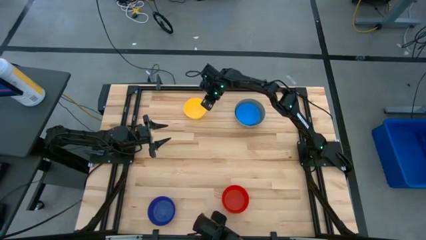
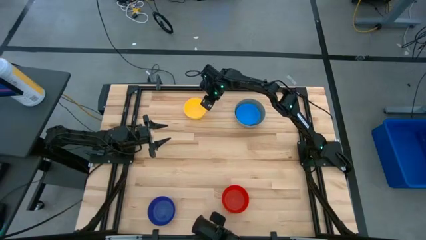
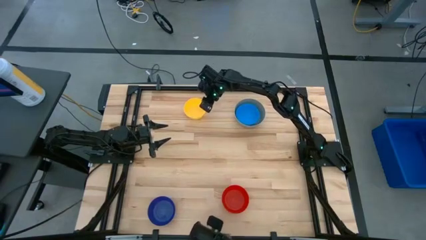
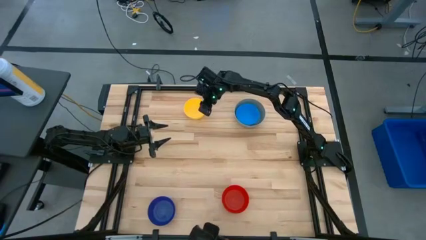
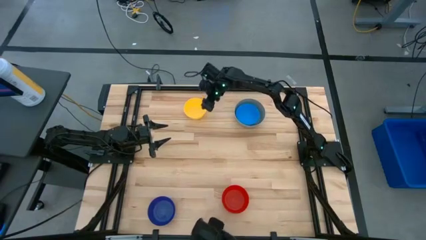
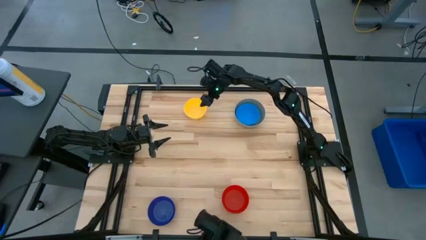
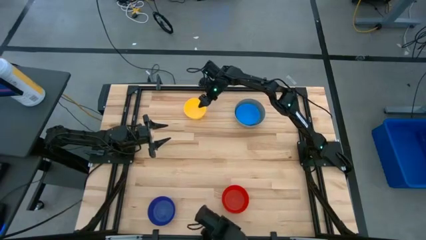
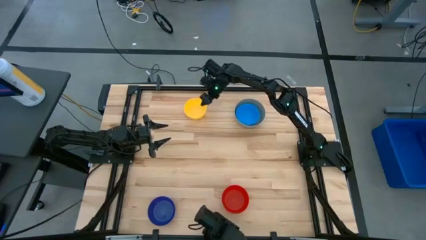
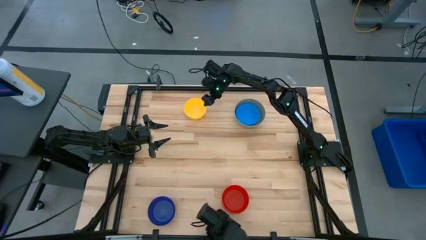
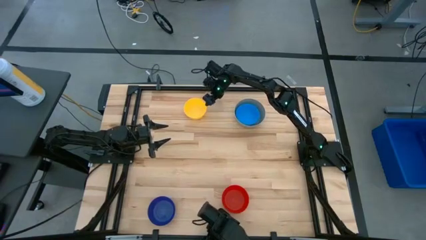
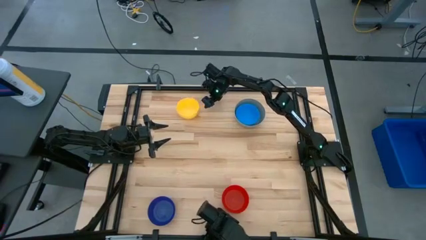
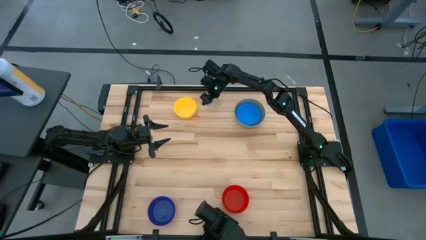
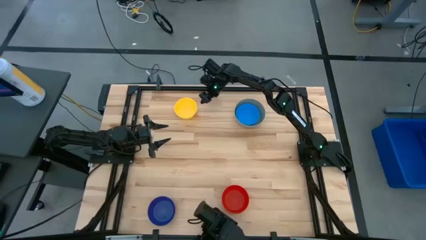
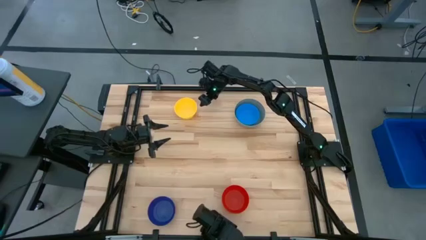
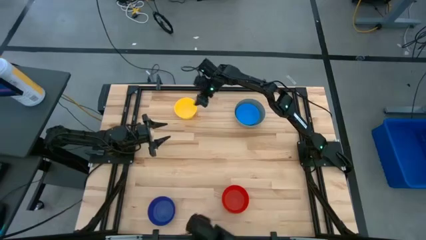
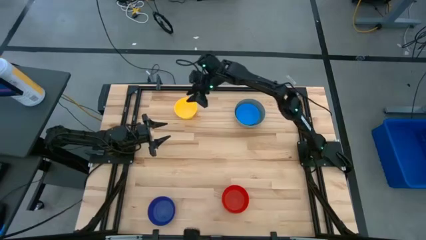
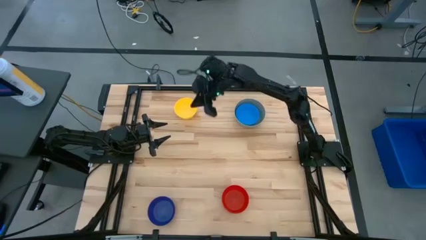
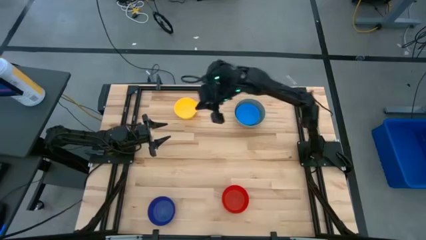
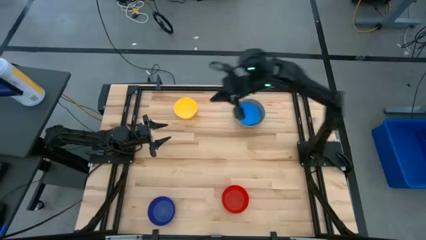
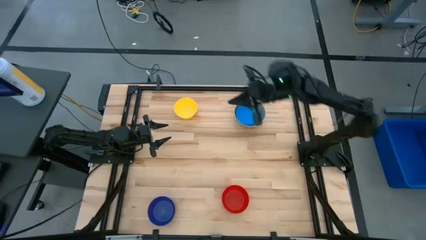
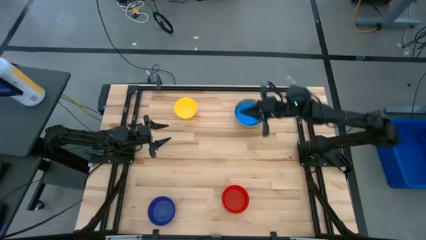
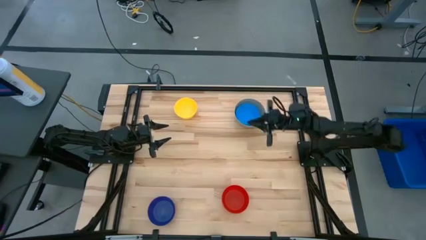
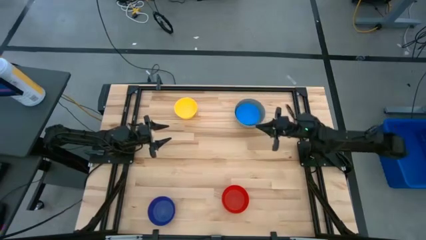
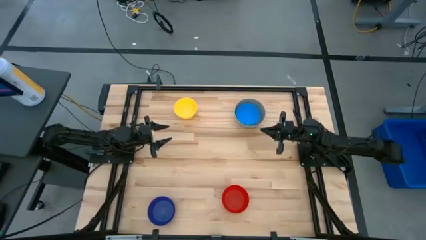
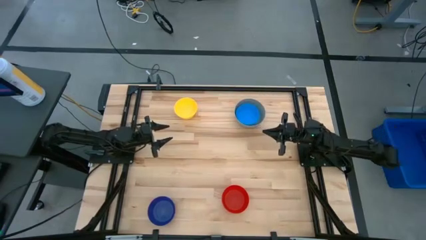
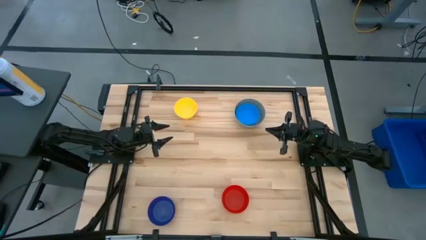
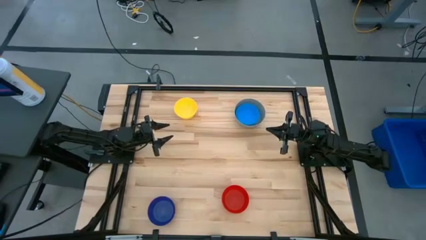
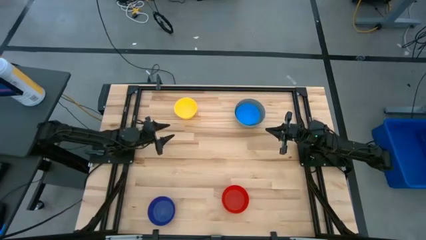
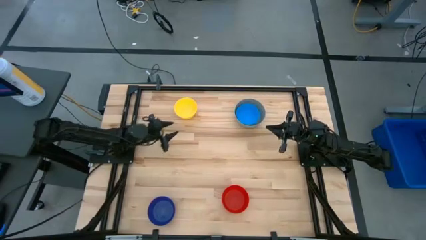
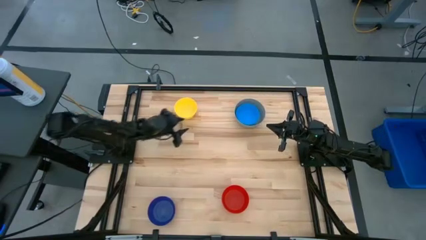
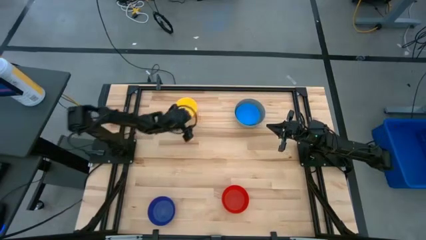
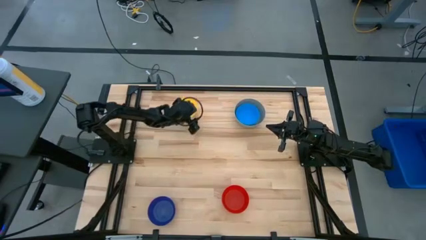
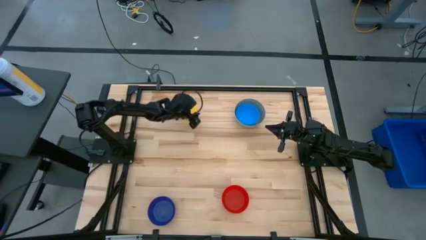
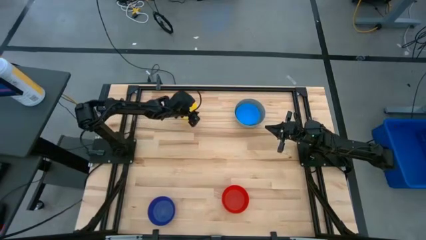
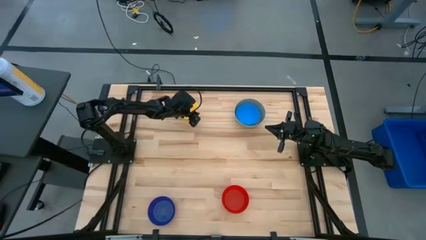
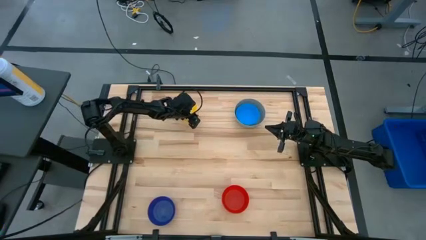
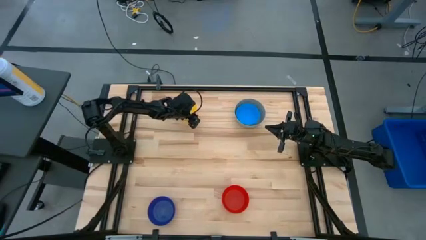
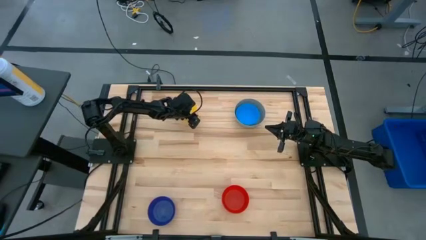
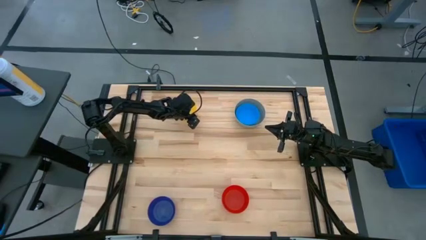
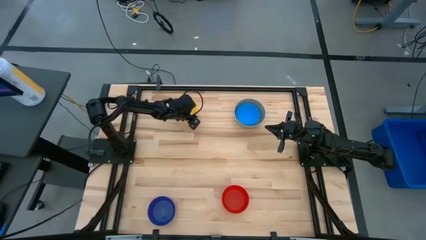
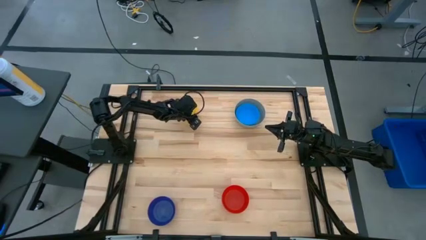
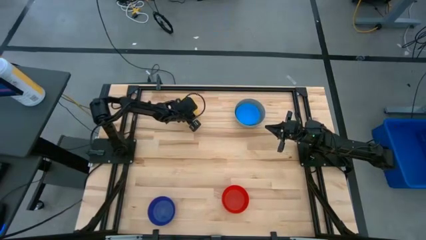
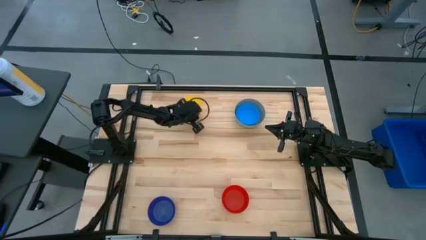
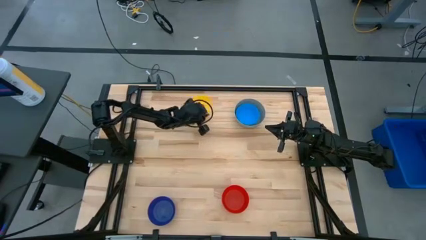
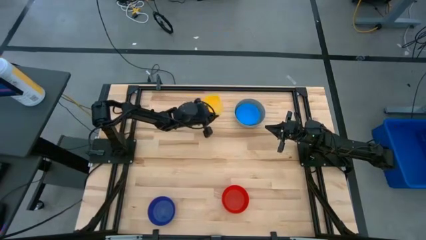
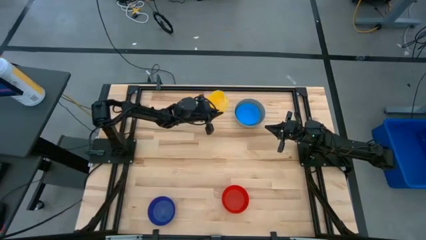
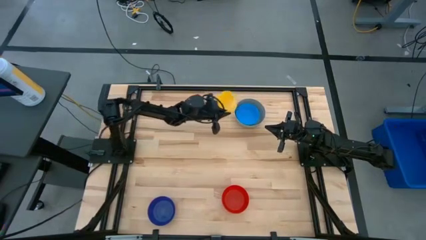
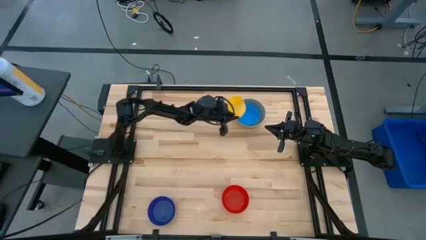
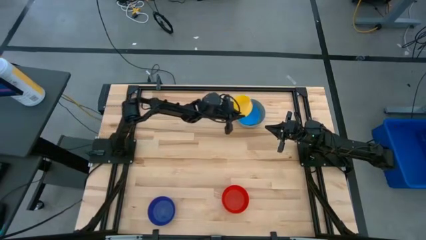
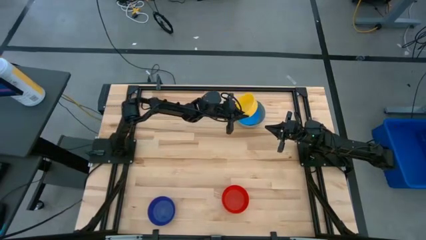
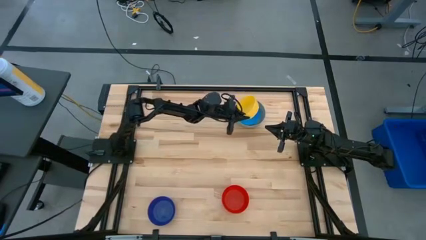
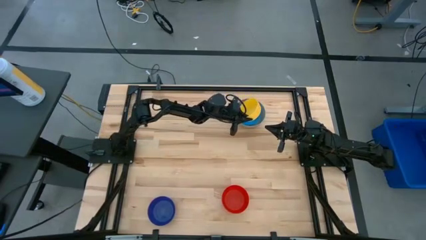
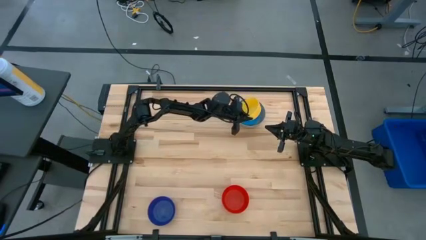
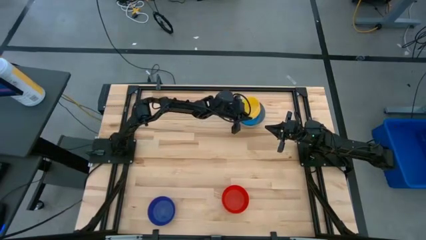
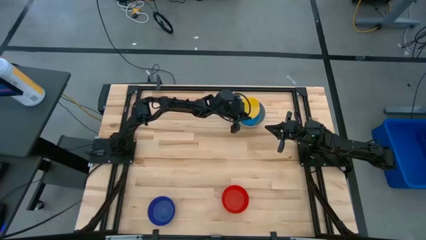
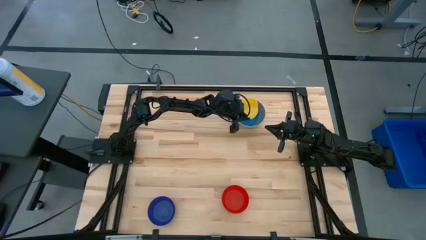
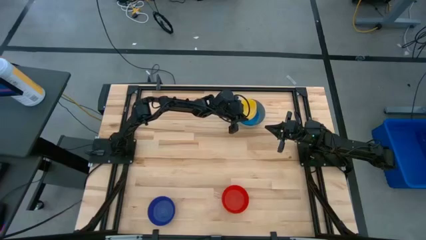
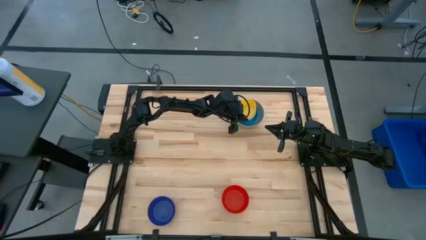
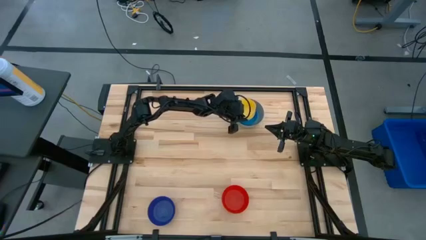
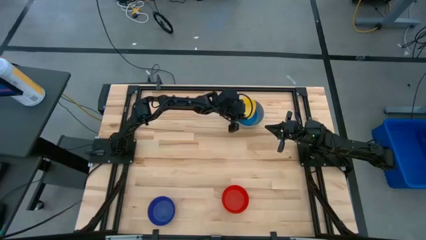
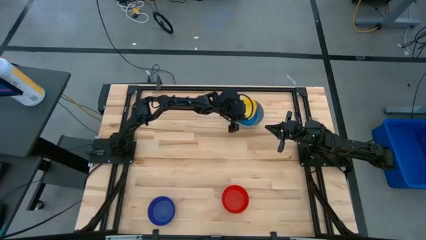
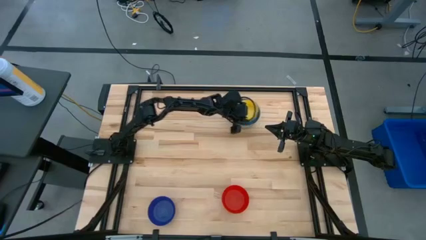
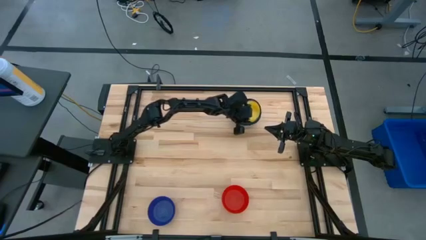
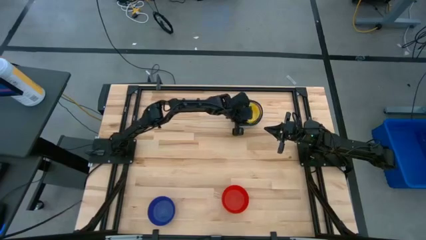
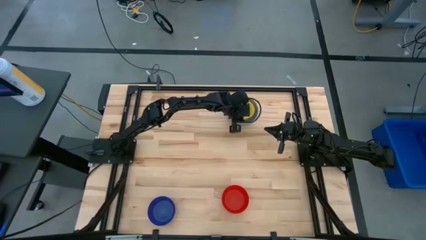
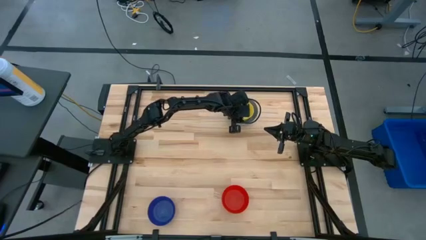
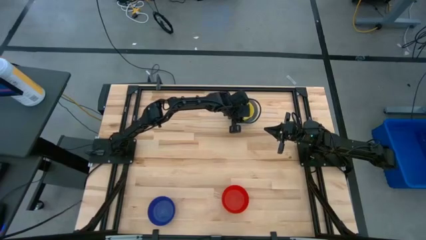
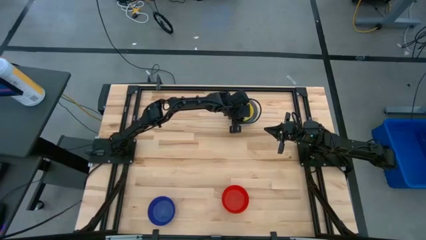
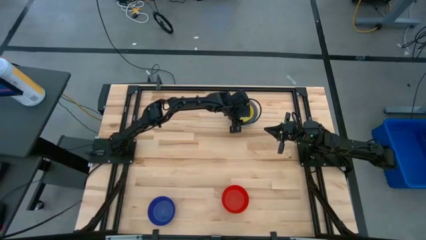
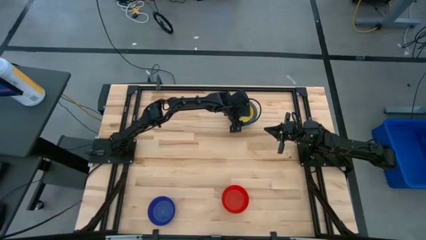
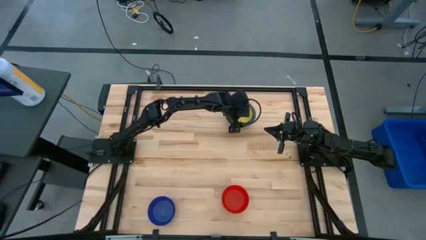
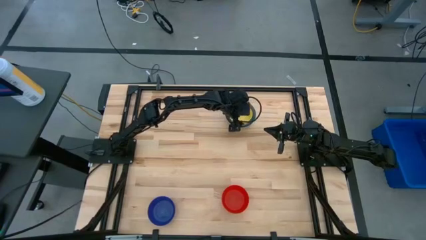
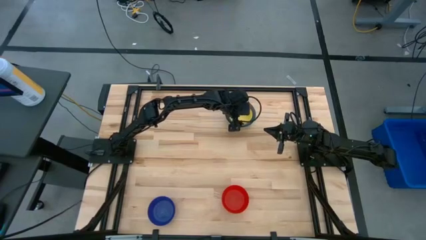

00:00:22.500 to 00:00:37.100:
Stack the yellow bowl on the blue bowl
